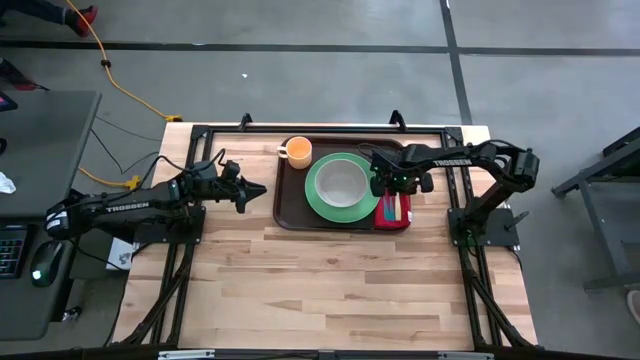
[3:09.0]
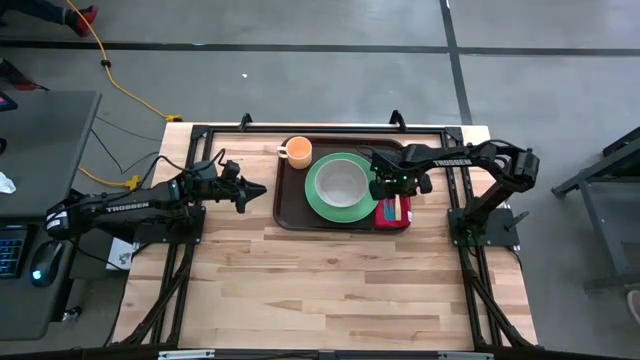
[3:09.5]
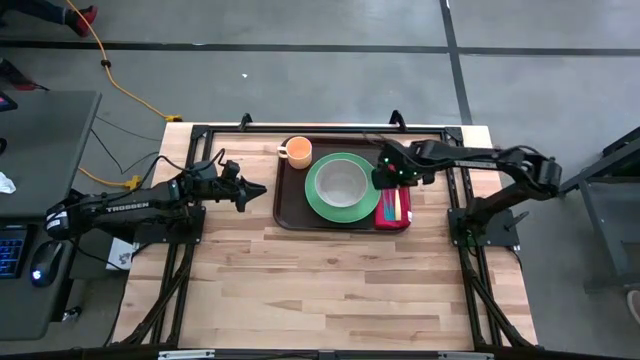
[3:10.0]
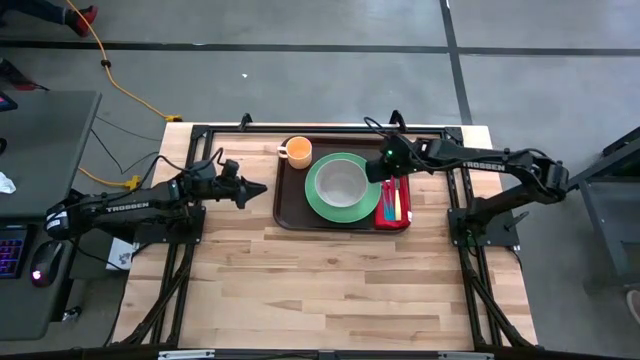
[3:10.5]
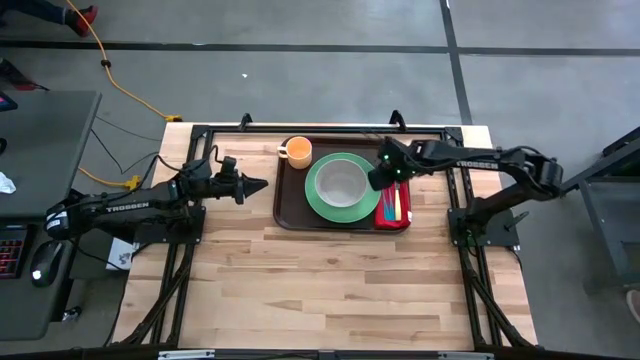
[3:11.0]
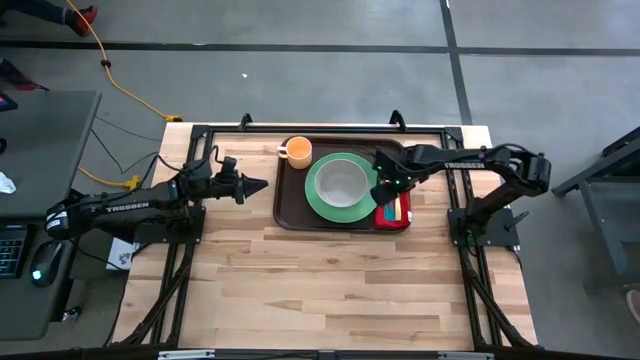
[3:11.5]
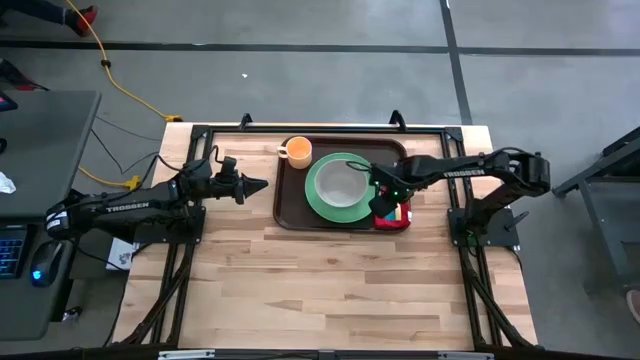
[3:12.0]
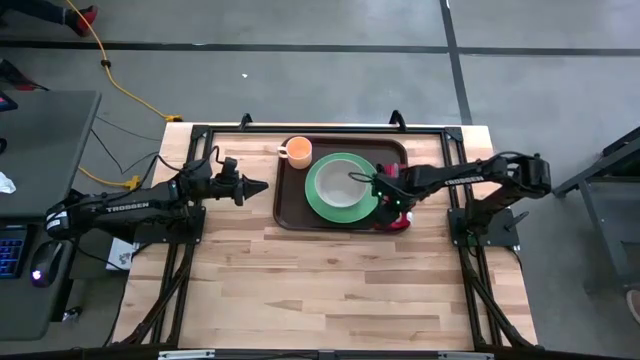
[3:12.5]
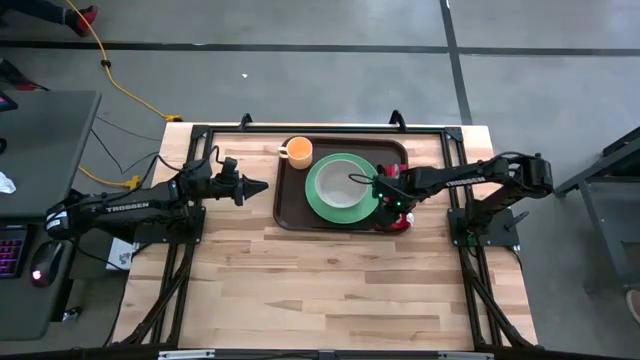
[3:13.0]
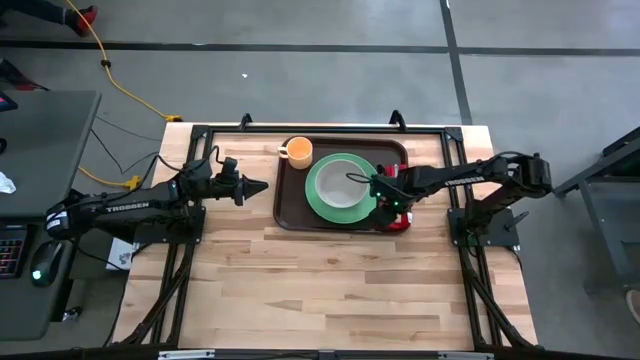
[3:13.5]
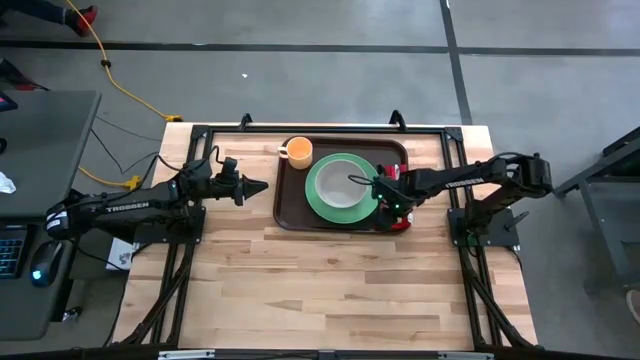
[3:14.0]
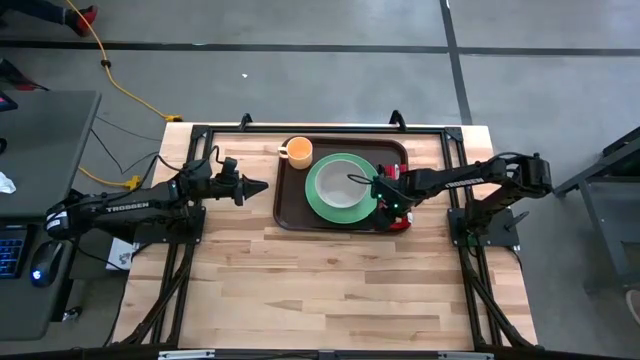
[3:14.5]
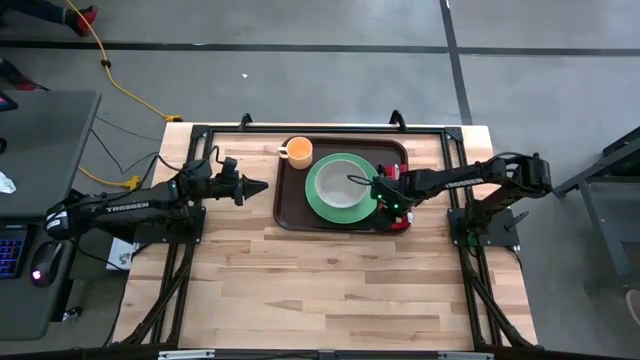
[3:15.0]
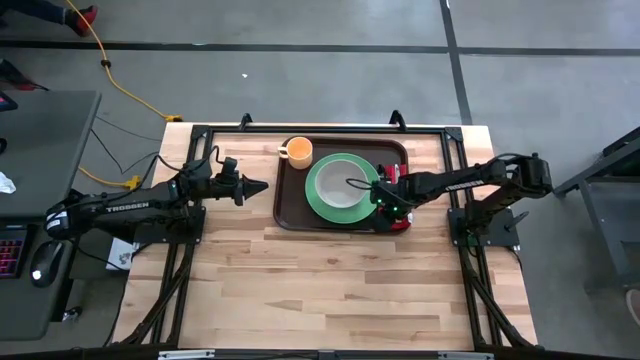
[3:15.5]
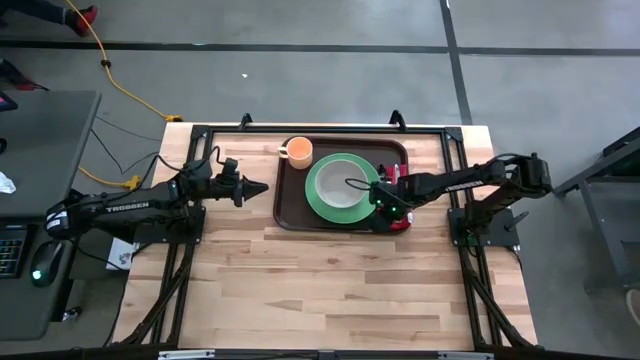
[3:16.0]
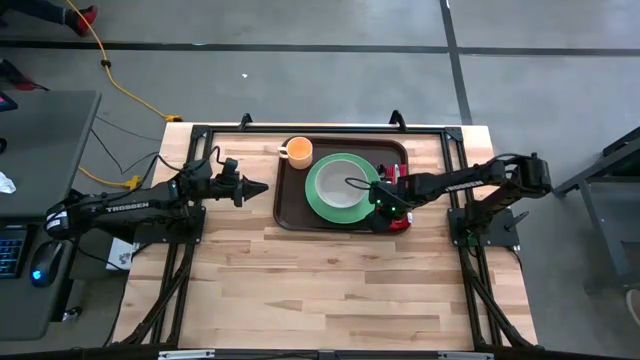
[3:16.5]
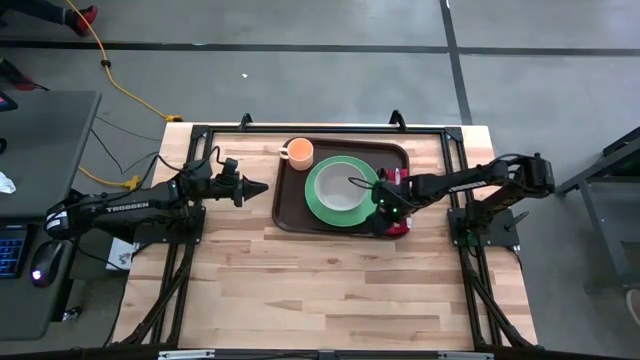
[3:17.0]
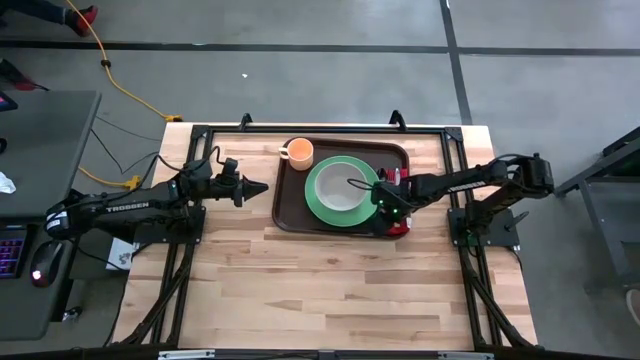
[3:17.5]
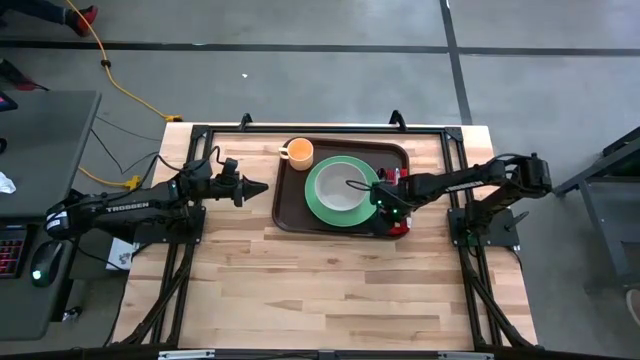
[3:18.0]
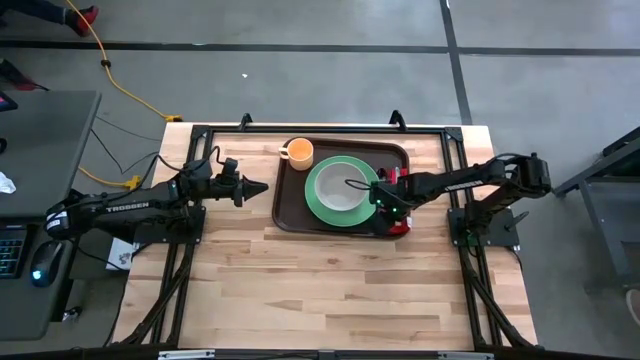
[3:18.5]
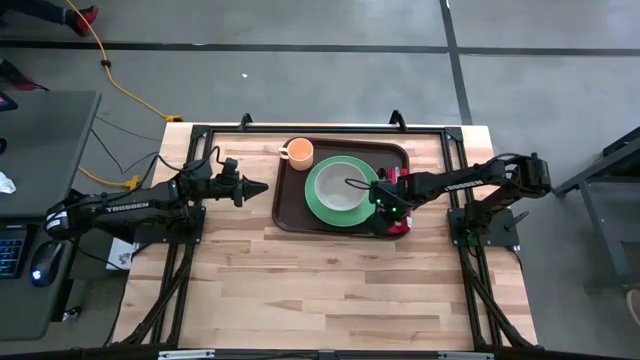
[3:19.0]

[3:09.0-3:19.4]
Task: Set up tray
Adjust the silverware on top of red table napkin on the brown tray

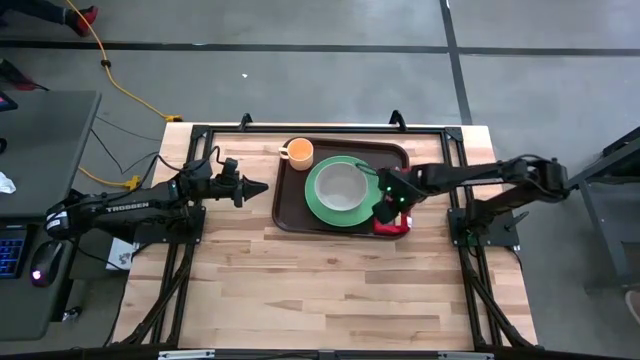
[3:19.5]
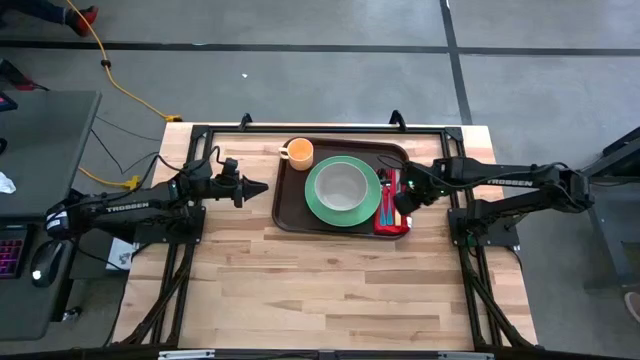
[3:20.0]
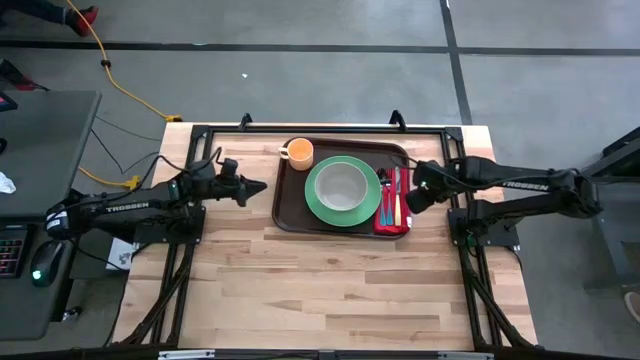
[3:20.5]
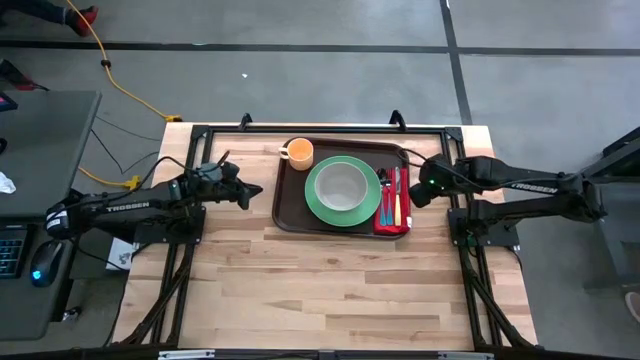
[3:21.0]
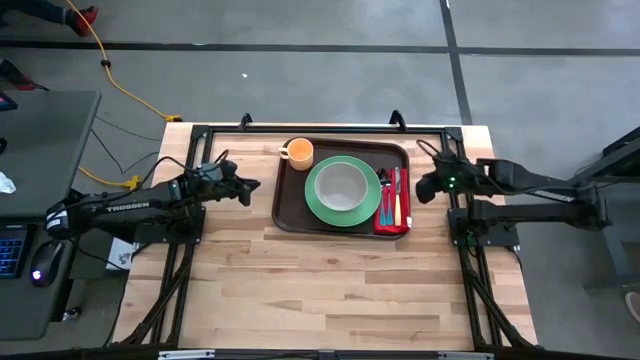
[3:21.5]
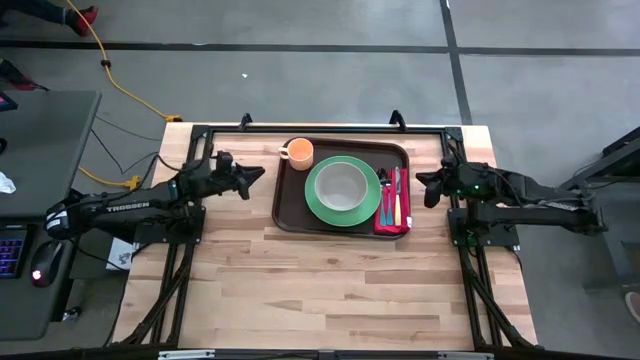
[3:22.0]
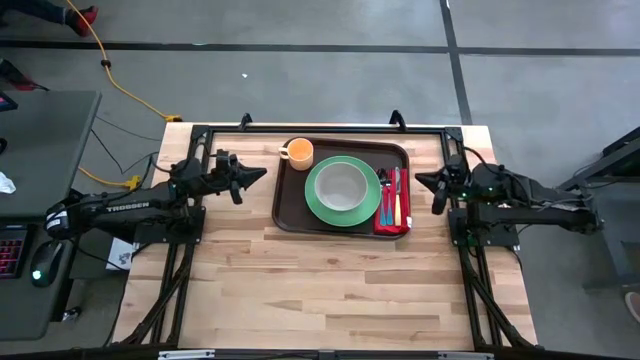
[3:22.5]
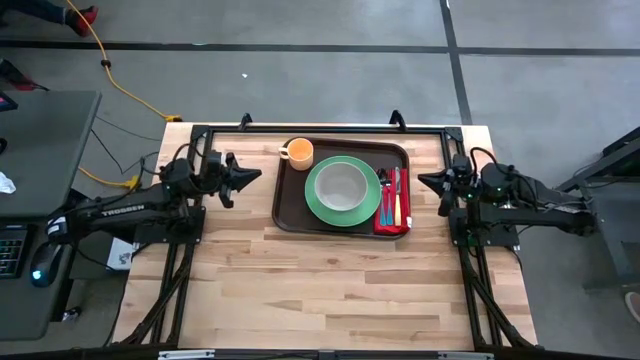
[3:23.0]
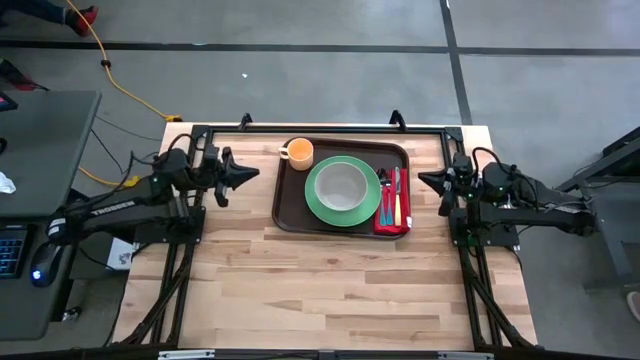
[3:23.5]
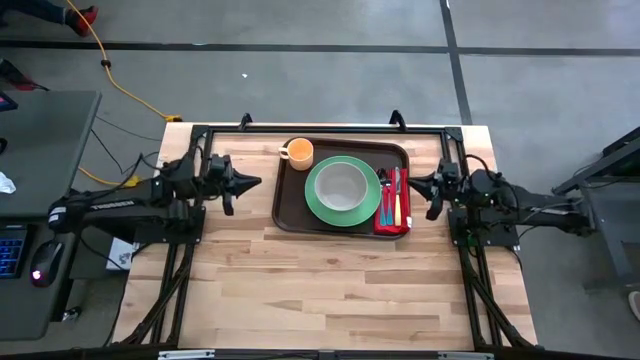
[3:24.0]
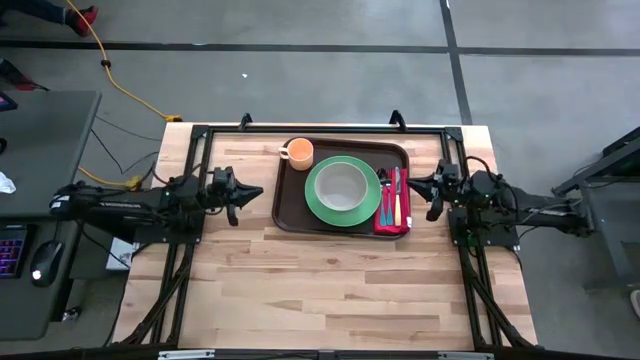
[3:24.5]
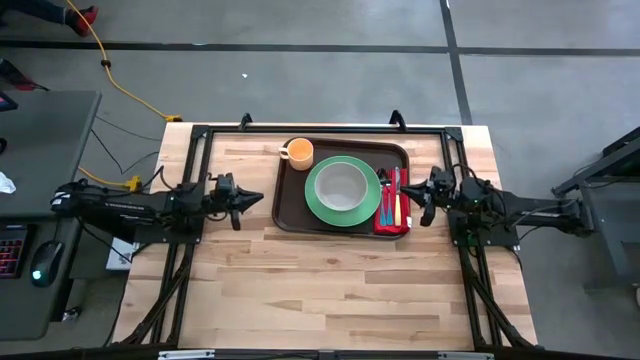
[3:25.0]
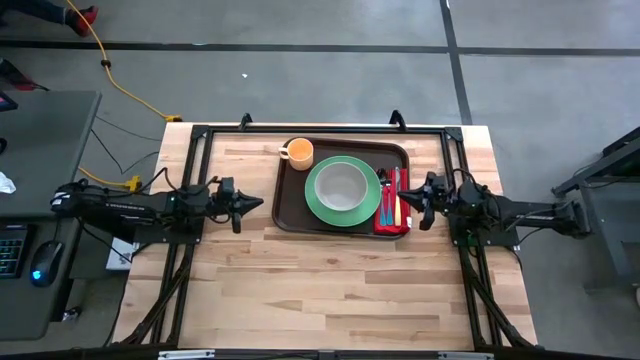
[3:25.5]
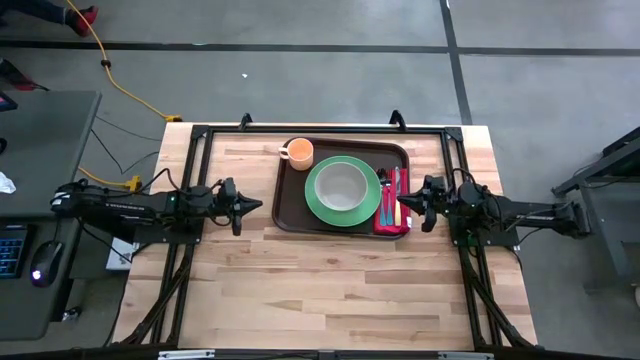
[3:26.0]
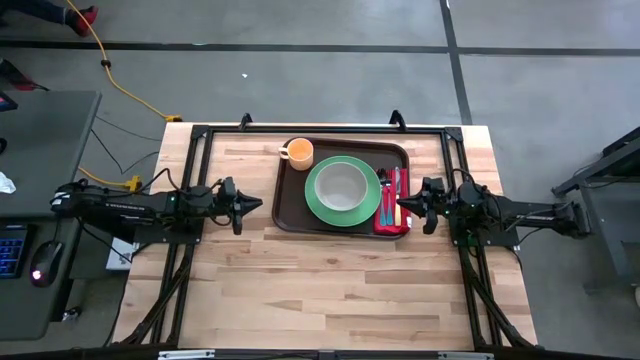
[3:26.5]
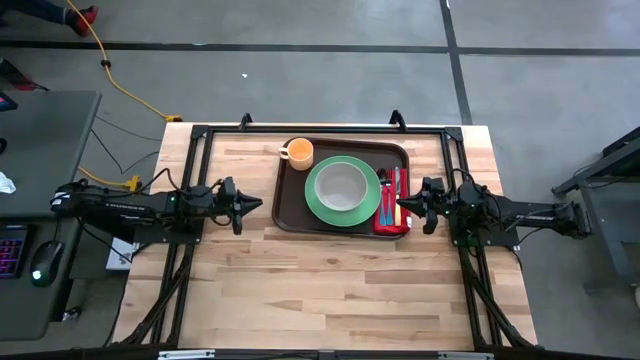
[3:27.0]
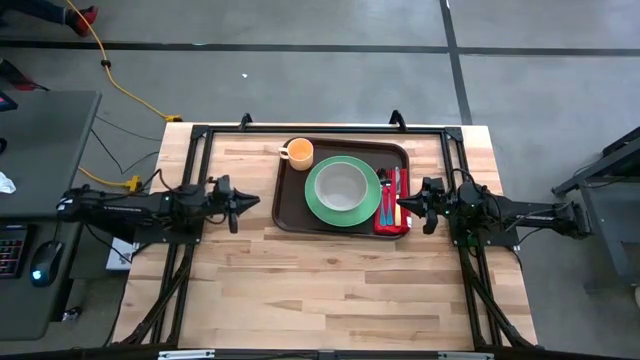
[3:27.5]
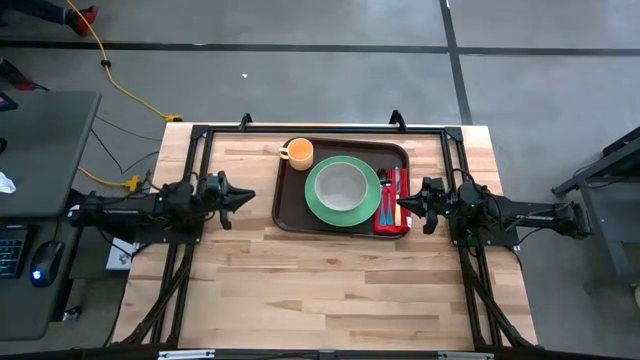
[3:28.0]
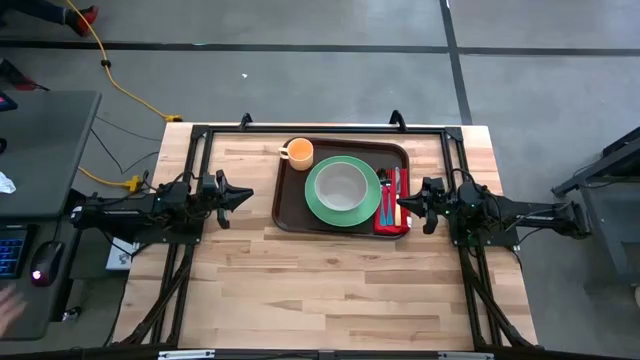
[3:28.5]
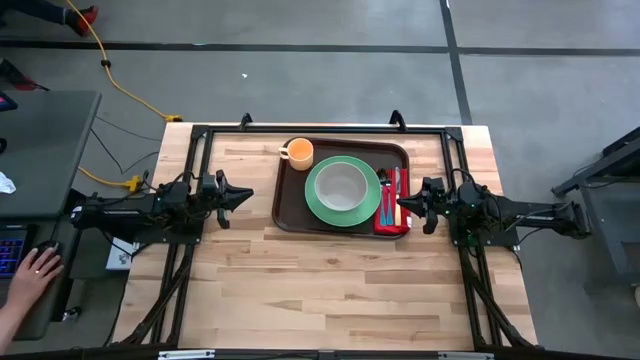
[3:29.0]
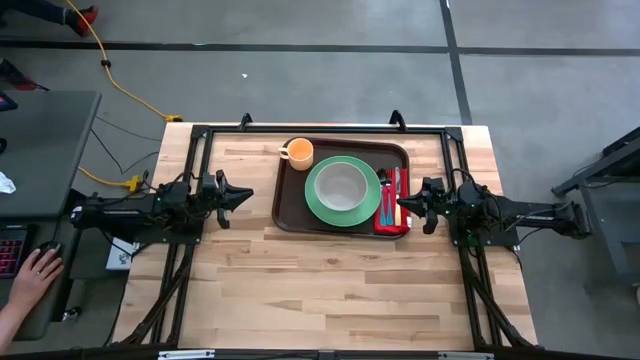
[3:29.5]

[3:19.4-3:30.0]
Return to Home Position

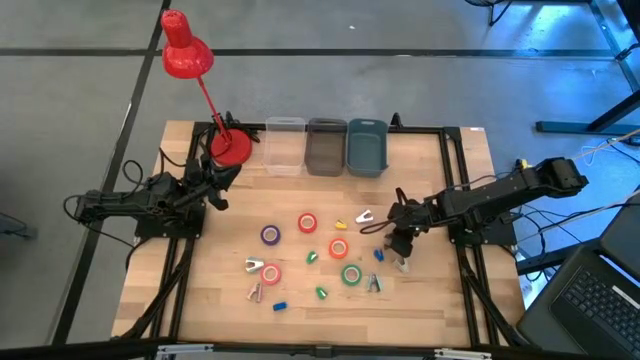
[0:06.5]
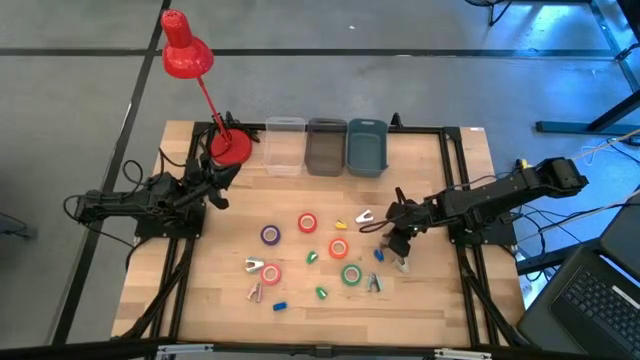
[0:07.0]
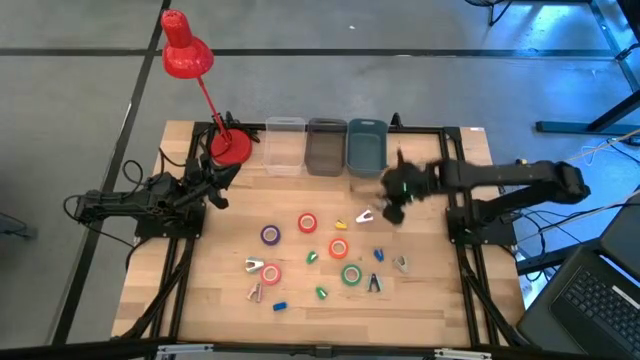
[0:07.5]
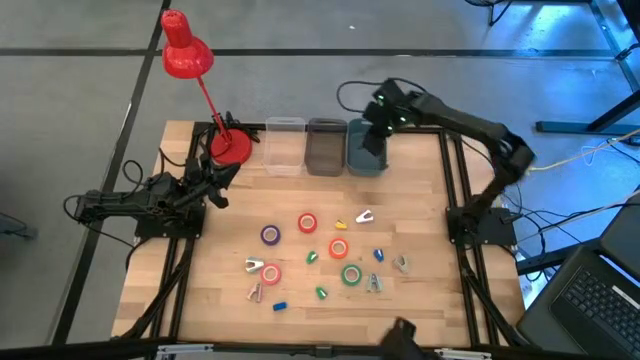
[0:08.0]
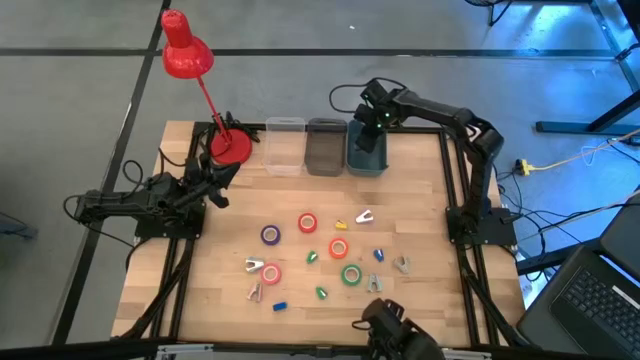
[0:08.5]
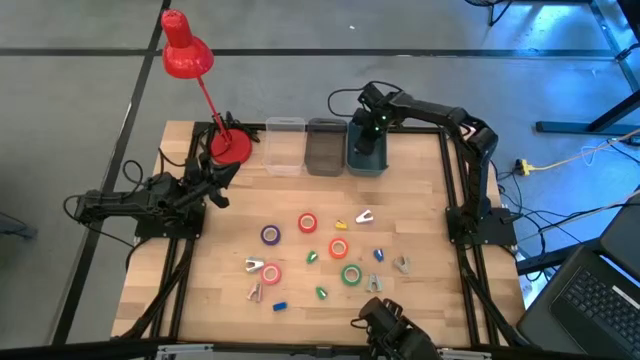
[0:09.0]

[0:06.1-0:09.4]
Task: Pick and place Stapler, Stapler remover, tape
Put the black staple remover into the blue bin
